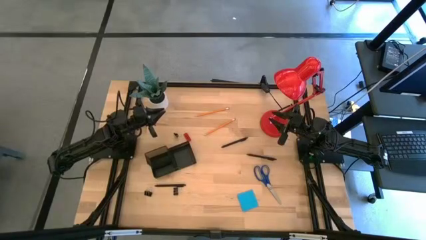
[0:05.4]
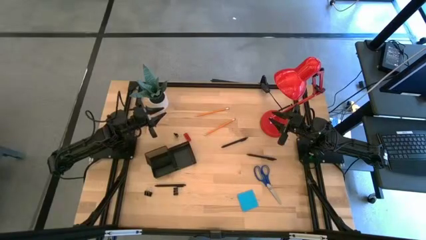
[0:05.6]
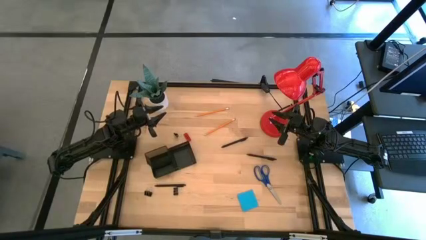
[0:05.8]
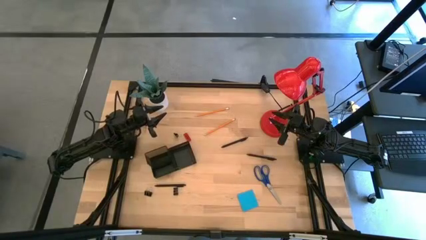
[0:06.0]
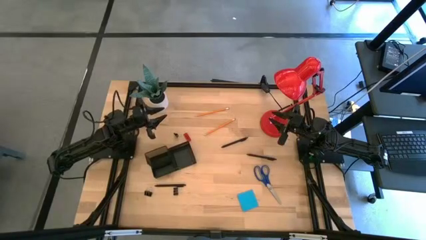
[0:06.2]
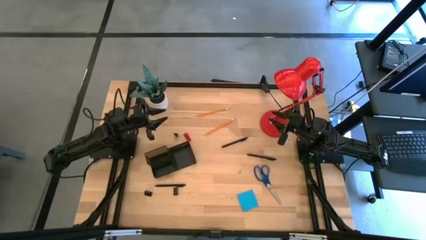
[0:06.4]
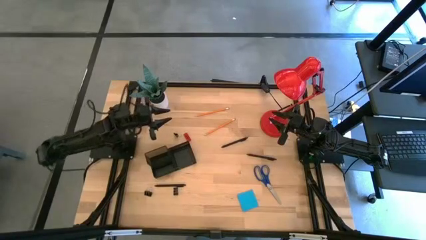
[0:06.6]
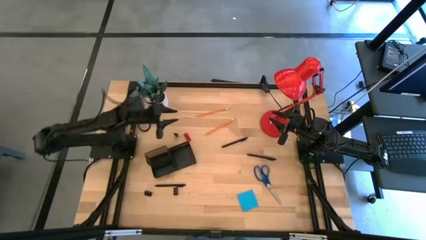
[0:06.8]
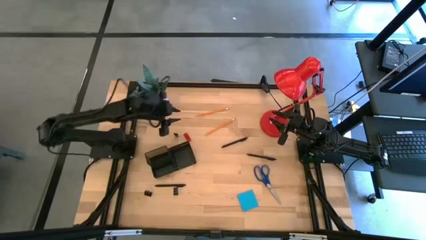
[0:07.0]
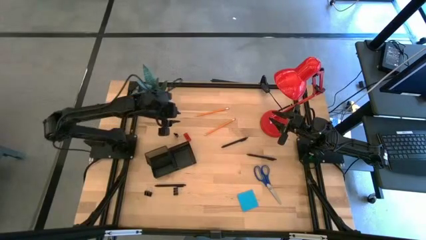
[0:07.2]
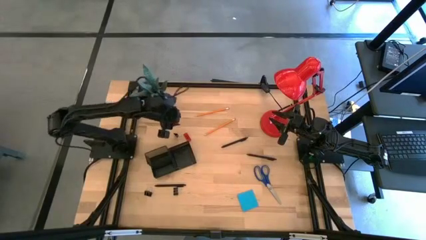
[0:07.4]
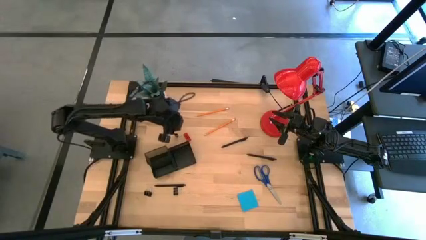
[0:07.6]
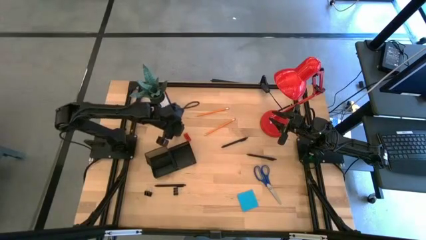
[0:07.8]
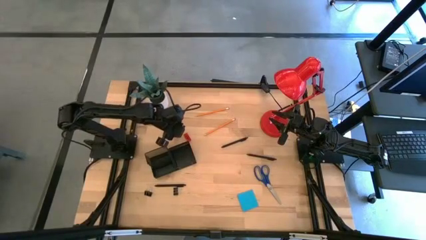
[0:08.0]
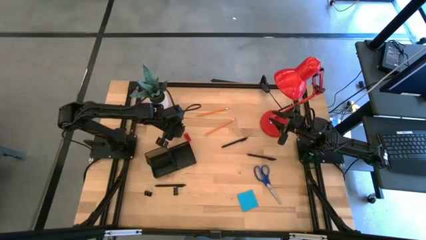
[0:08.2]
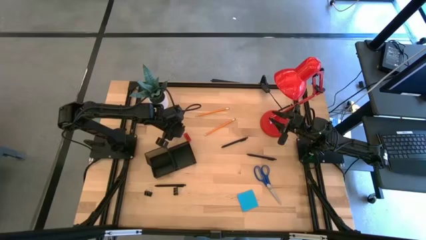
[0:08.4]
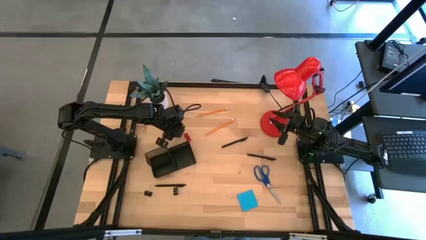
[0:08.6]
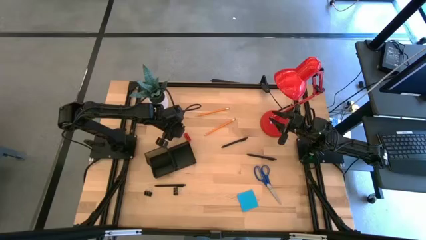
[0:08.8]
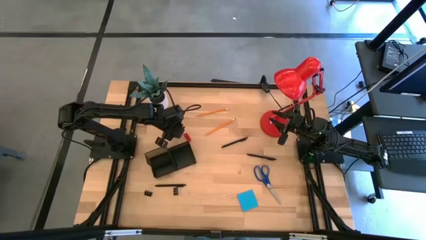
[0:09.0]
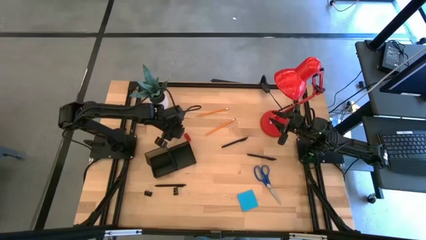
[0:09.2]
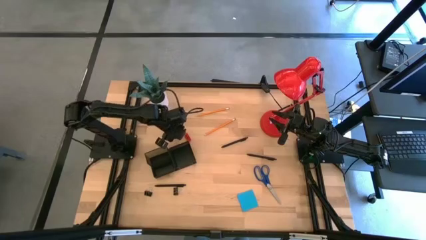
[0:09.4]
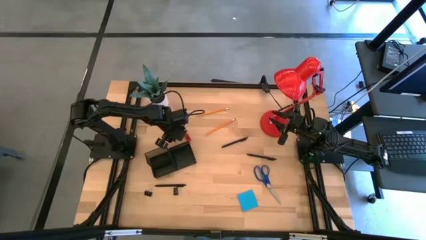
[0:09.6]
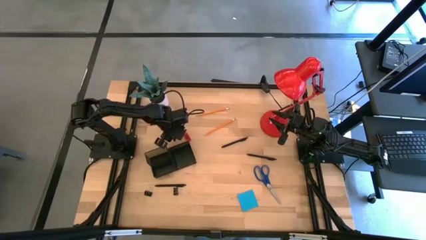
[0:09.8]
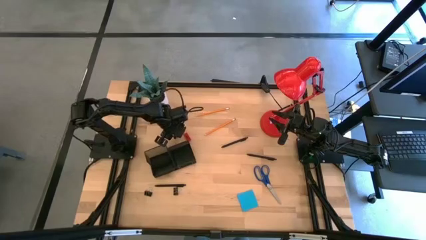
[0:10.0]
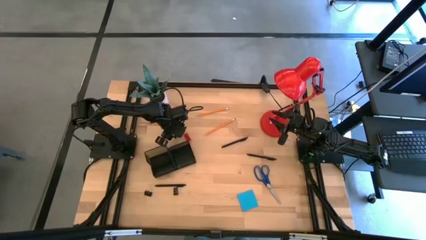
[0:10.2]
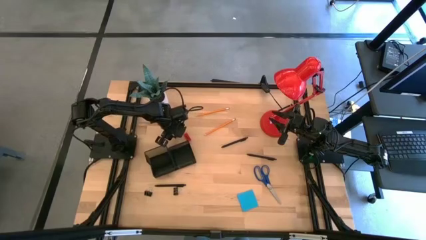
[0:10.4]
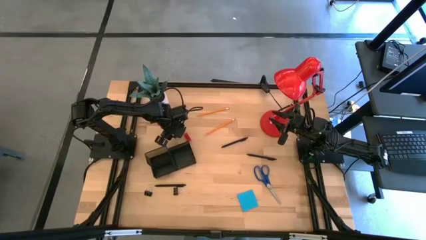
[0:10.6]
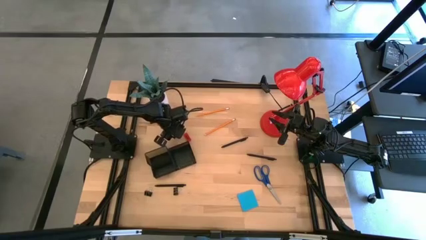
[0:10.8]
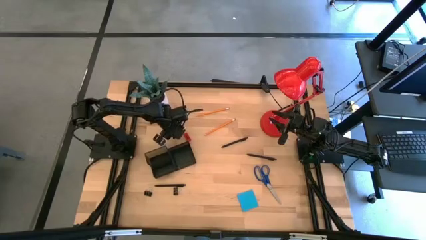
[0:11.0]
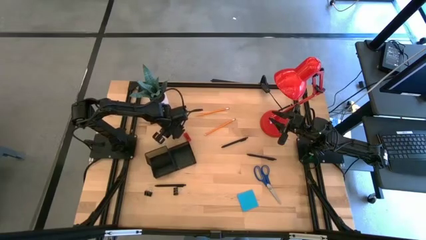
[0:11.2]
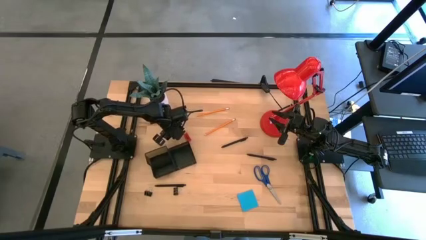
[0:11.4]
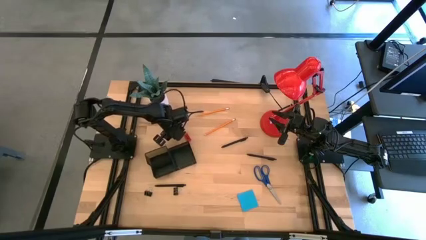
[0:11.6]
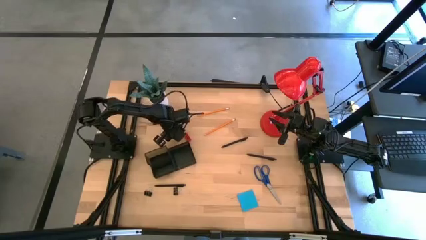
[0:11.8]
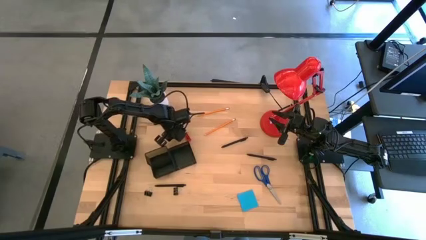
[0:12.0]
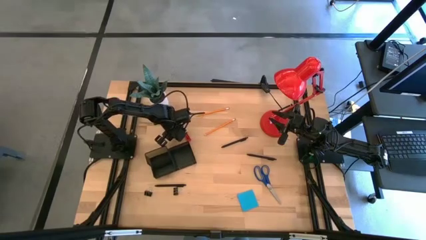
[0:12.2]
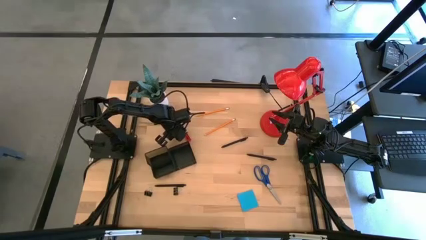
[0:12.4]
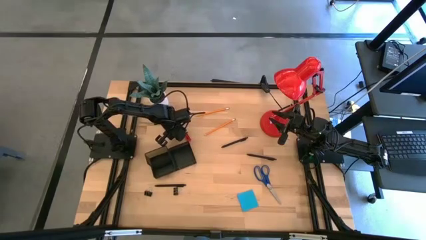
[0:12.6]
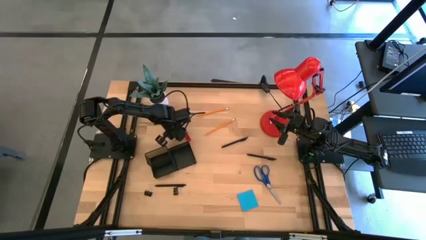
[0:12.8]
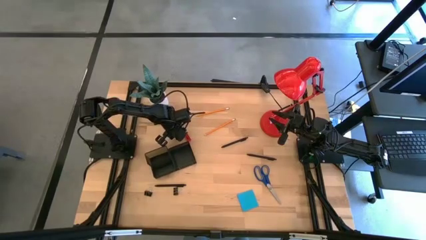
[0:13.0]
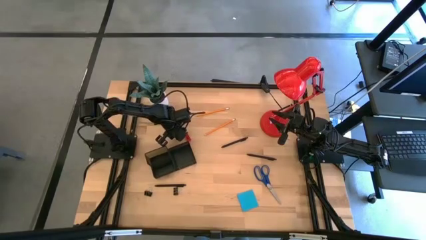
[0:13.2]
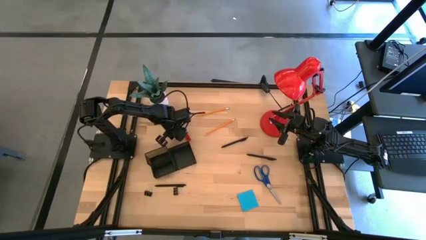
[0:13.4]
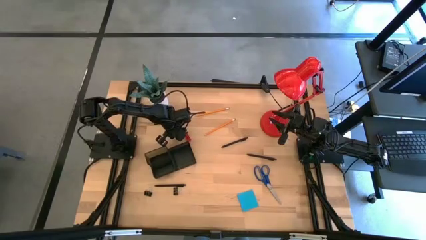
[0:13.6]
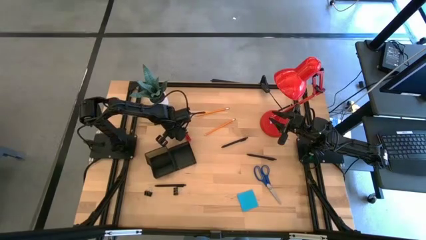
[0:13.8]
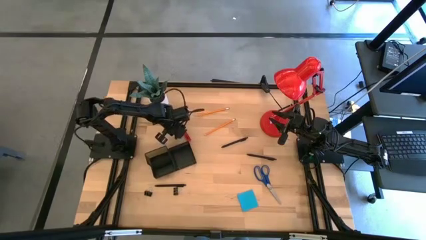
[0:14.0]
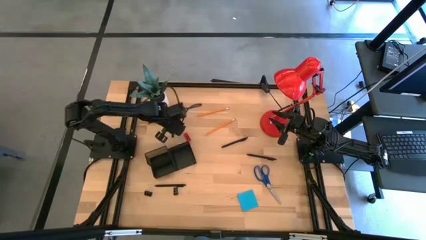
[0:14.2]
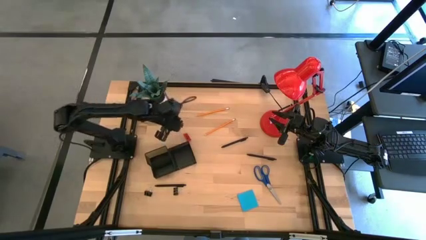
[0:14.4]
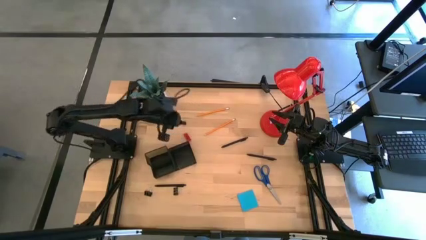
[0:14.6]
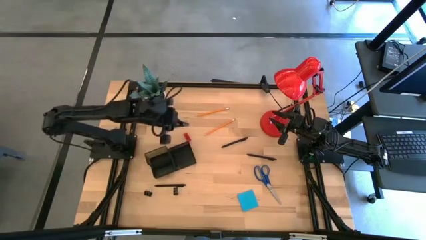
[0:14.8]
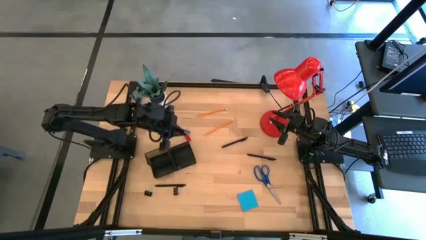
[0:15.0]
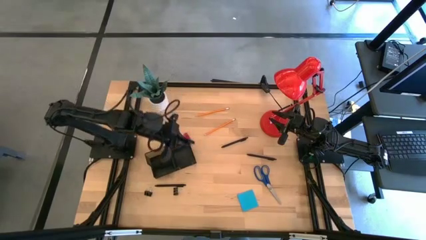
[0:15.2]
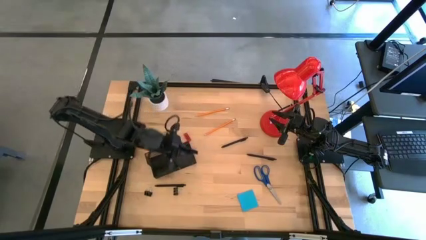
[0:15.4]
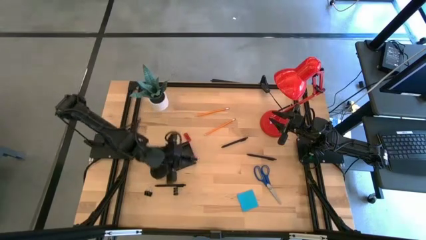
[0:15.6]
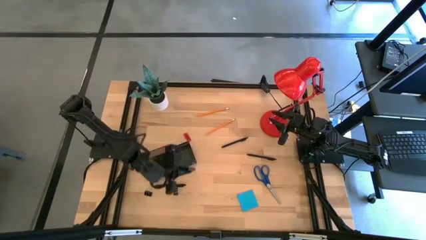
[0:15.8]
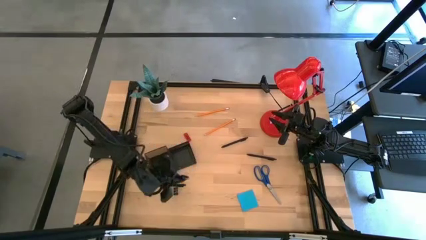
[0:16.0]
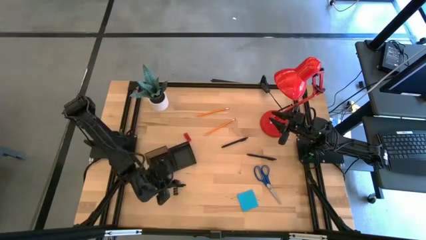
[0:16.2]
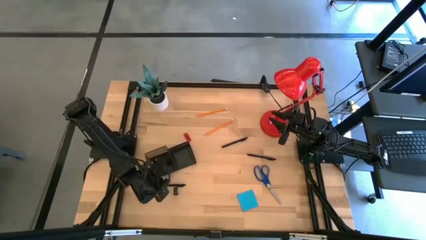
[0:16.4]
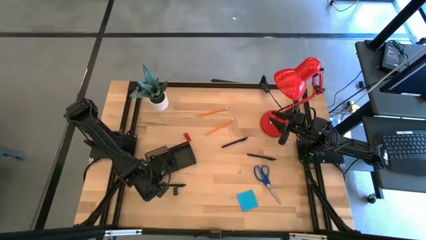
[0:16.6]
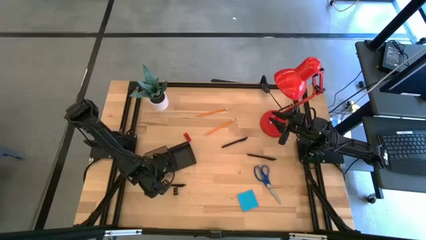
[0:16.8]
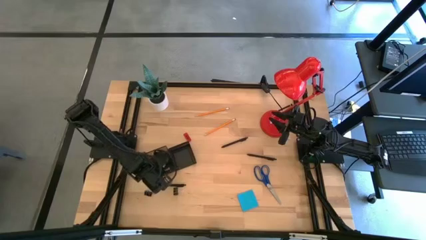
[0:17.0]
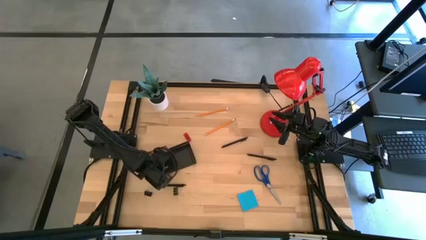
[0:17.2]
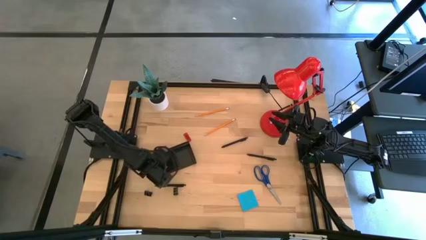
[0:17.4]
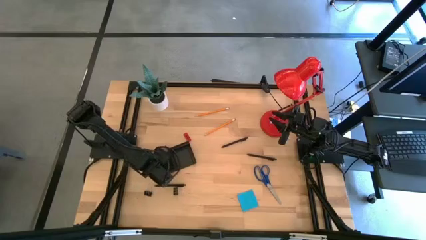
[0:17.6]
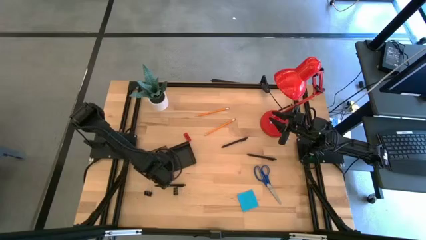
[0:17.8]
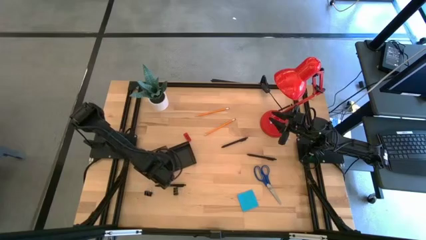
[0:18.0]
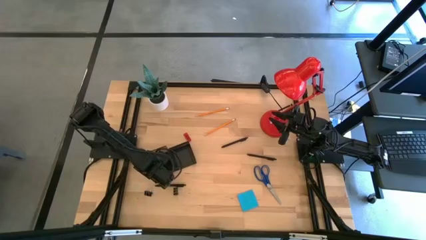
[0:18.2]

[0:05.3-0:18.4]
Task: Pick and place office supplies into organizer
Put the top binder clip into the front left compartment of the desk organizer
